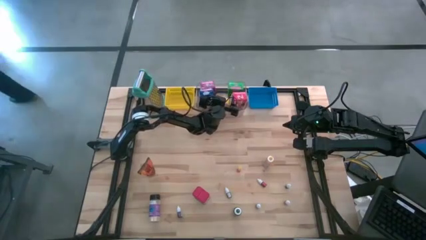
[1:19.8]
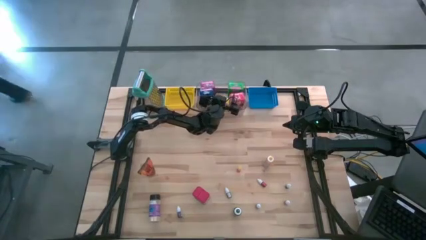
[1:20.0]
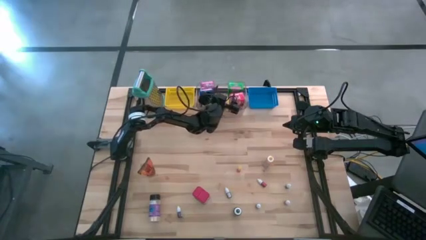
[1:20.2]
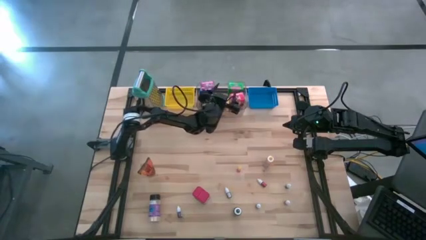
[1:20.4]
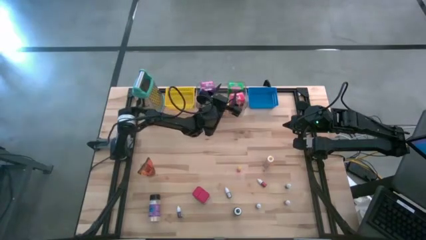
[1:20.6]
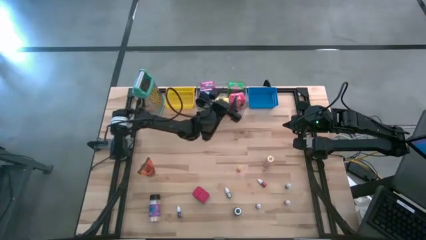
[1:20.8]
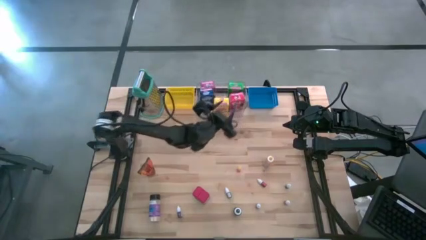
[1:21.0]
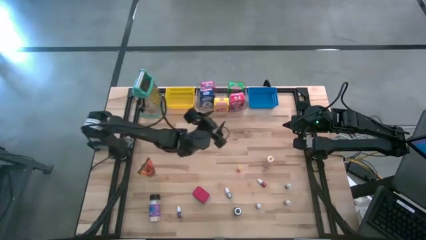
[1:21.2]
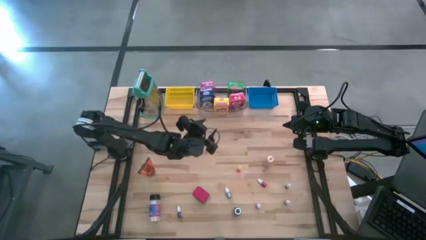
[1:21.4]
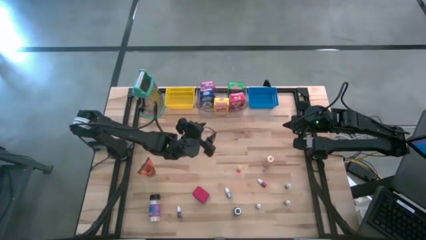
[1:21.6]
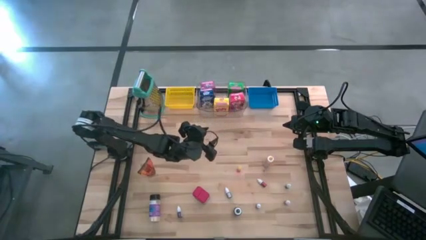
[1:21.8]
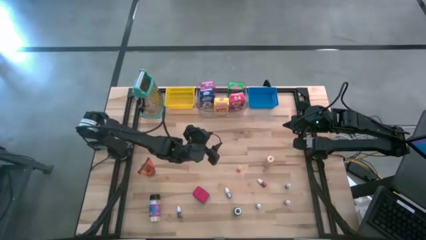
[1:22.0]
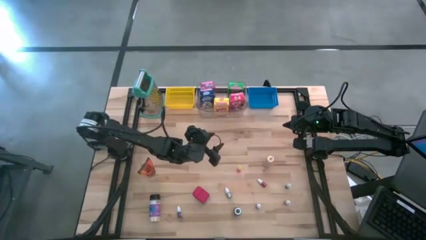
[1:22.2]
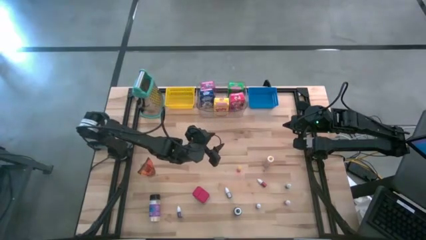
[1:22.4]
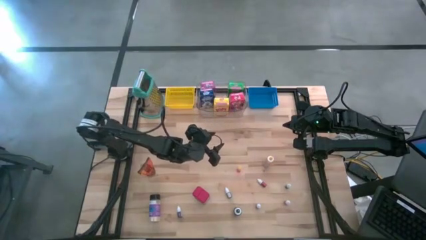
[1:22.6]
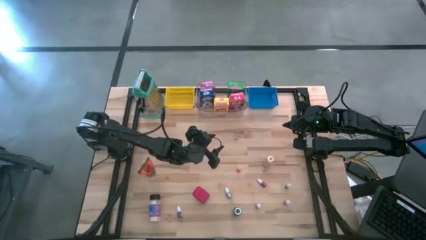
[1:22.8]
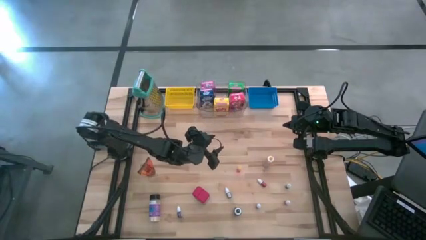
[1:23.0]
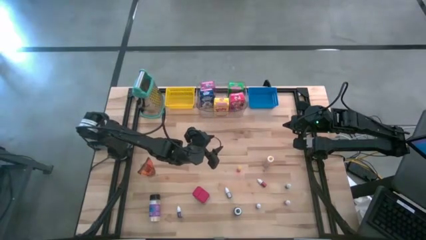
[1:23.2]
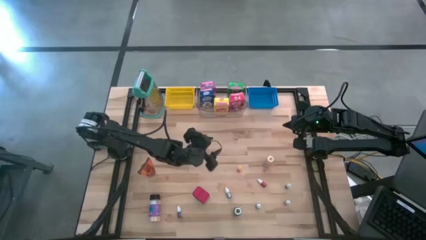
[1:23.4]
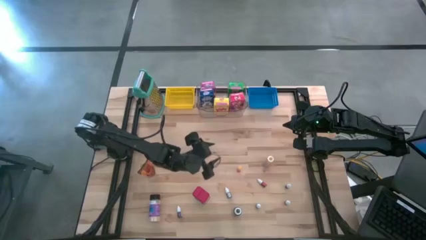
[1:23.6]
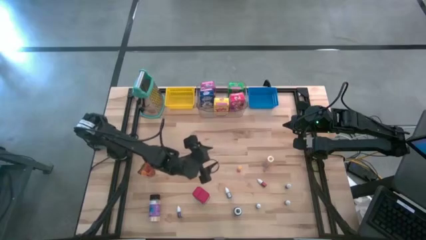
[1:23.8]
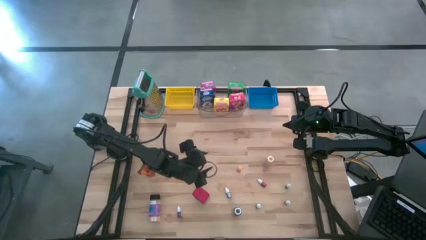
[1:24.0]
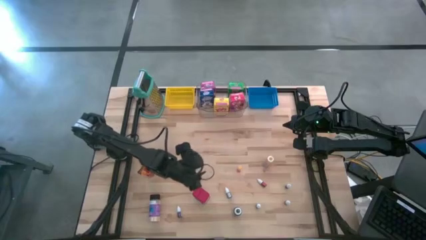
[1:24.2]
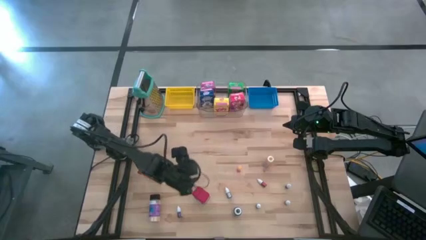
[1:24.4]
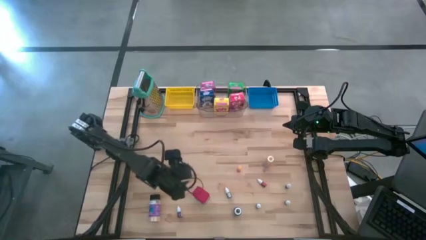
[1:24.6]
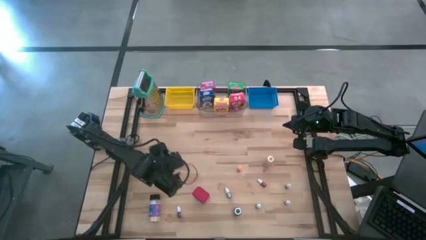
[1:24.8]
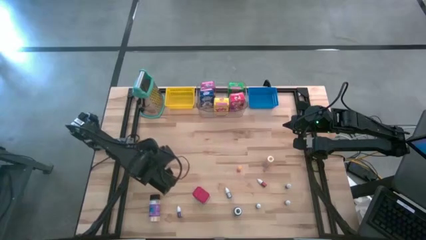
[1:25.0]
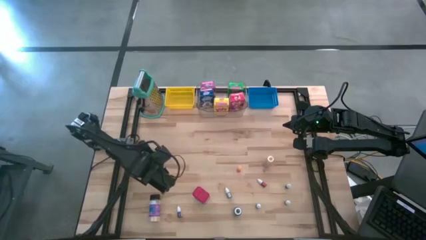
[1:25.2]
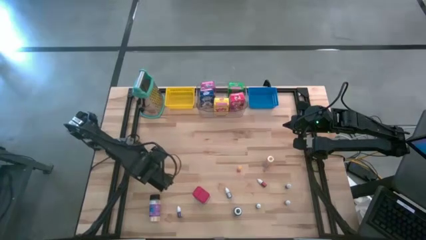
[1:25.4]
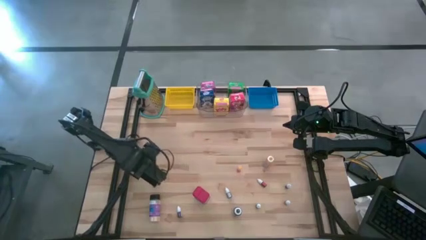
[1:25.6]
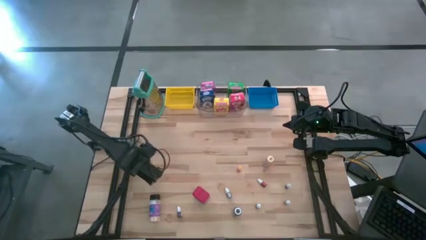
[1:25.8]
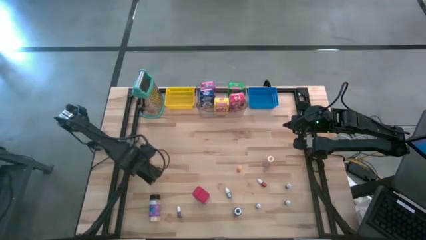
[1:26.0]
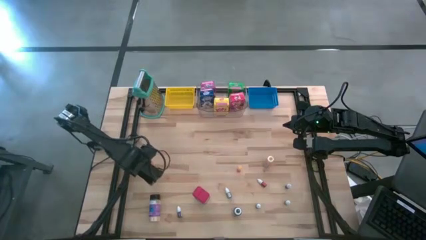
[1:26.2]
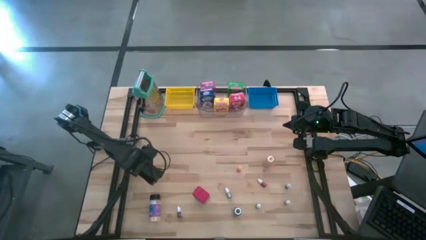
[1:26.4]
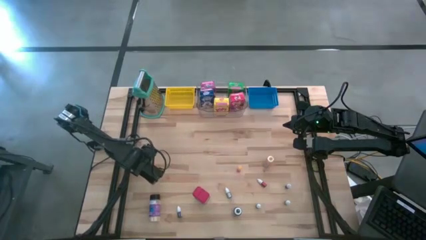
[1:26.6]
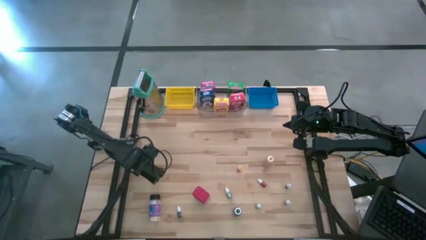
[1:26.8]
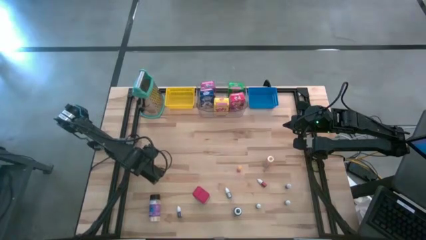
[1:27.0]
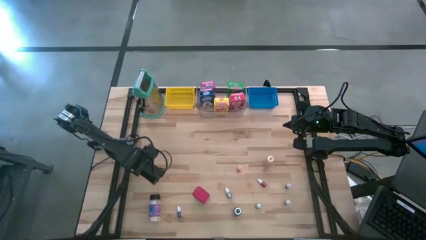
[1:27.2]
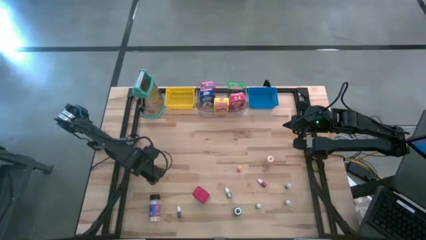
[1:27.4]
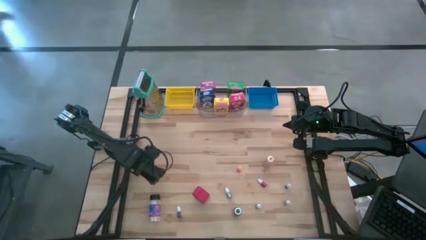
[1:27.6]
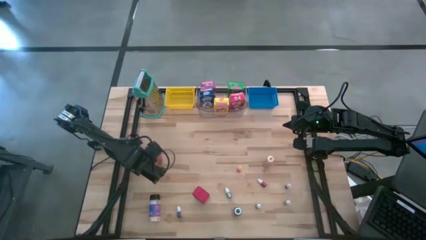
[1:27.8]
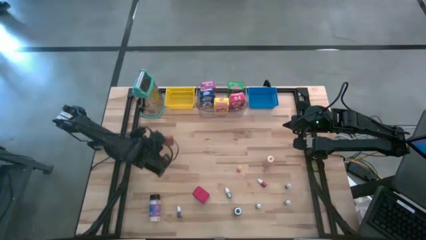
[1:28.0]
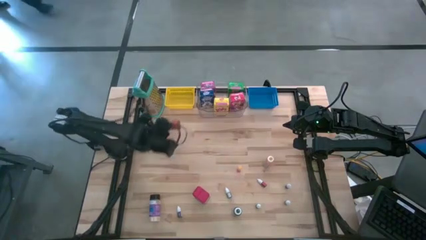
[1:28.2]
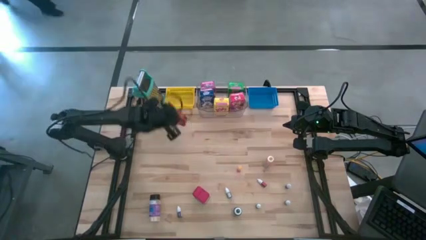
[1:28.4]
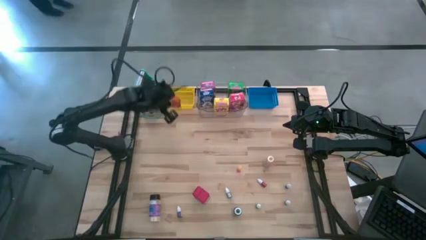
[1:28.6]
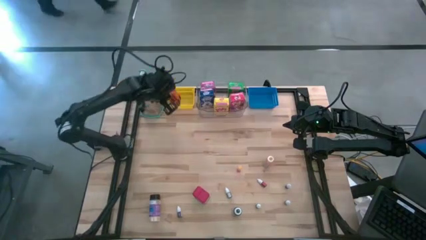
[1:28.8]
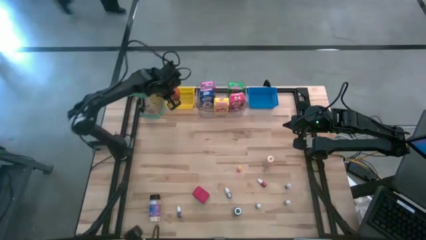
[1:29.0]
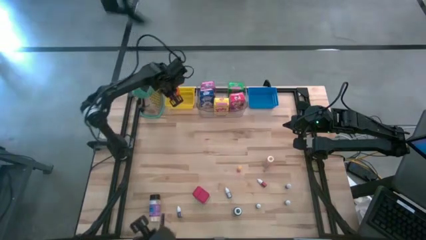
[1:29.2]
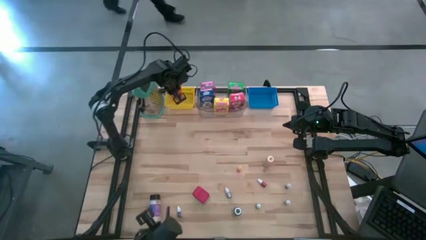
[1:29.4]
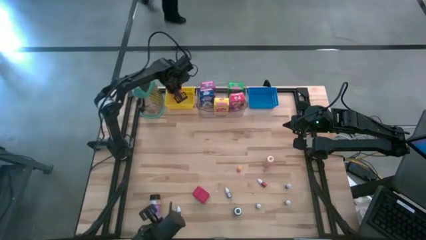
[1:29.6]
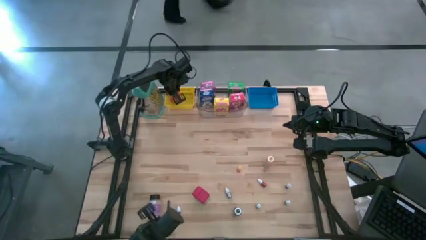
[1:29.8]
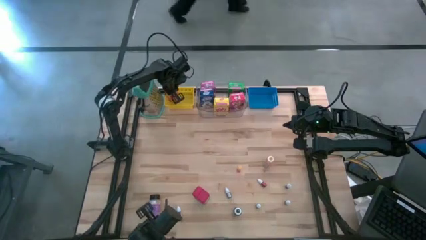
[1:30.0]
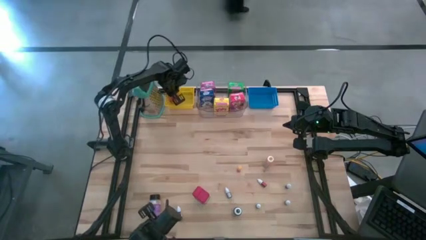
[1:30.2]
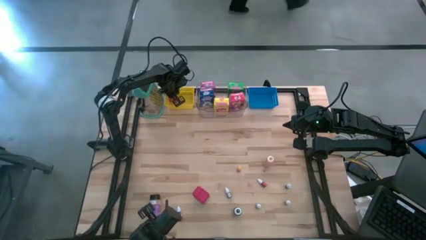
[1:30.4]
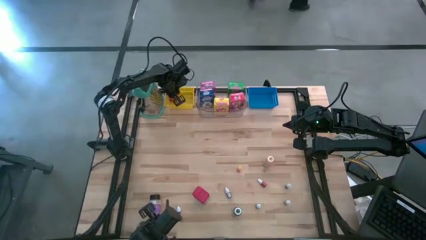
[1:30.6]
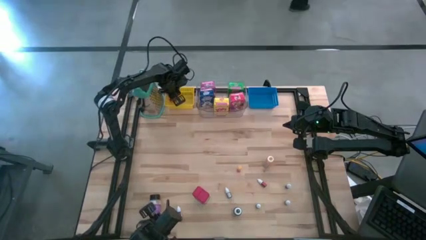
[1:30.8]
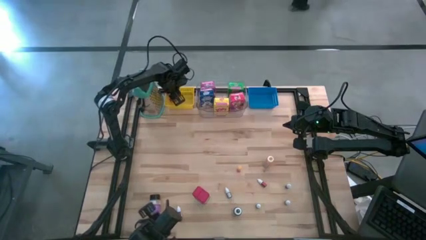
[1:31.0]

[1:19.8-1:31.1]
Task: Pick & Place Kitchen Items
Put the brown seasoning bag into the yellow bin
